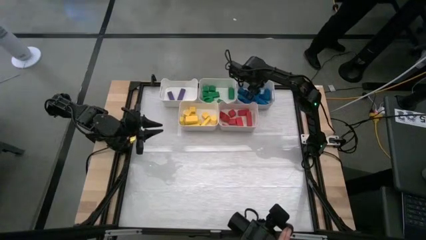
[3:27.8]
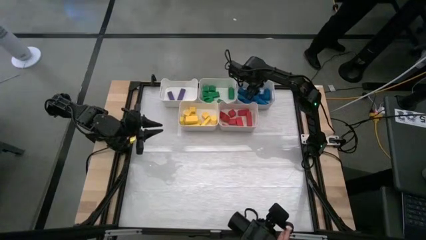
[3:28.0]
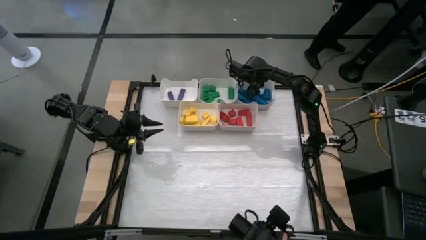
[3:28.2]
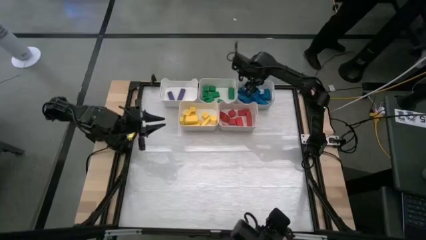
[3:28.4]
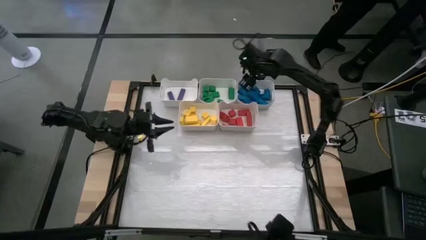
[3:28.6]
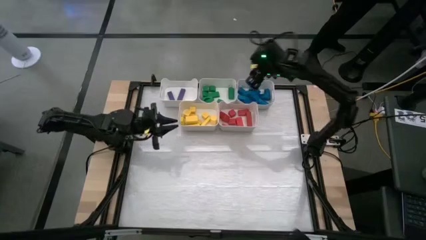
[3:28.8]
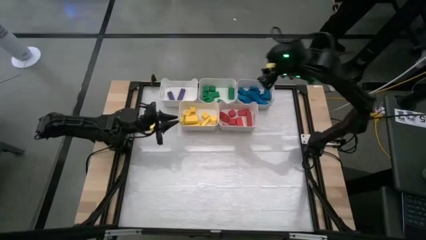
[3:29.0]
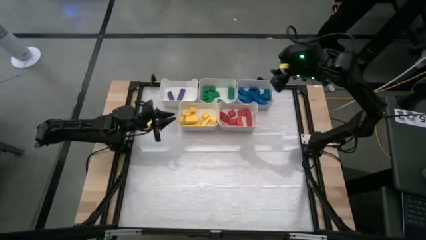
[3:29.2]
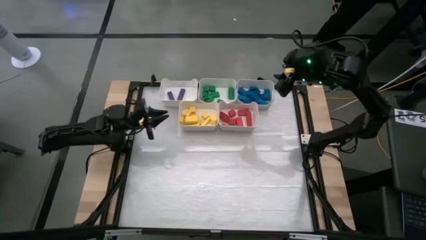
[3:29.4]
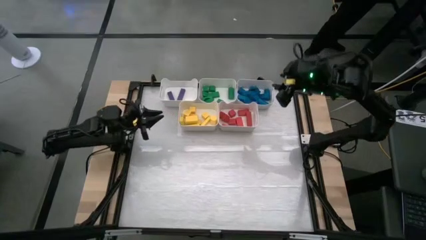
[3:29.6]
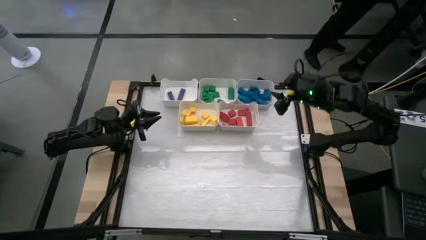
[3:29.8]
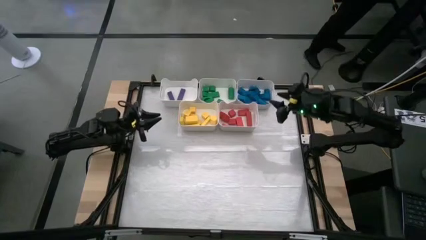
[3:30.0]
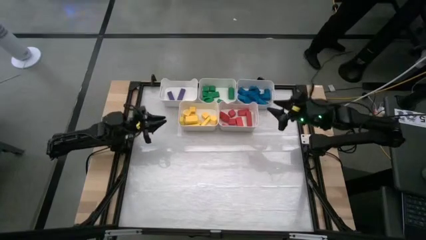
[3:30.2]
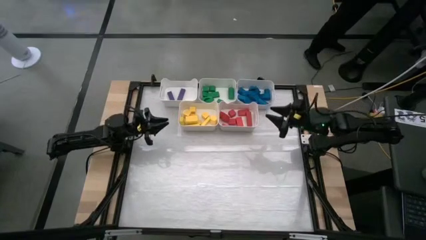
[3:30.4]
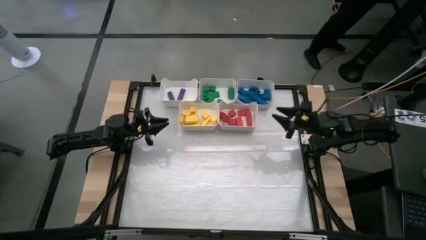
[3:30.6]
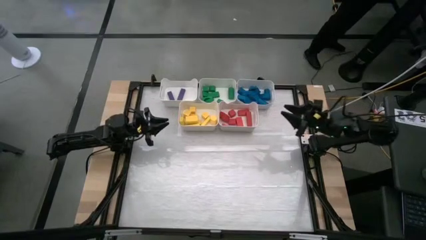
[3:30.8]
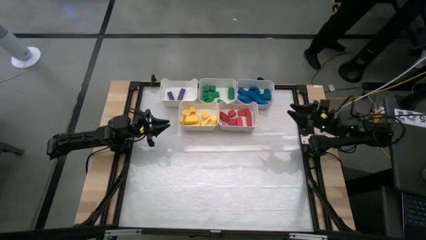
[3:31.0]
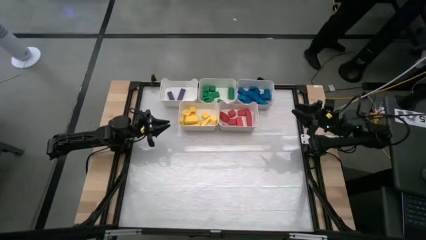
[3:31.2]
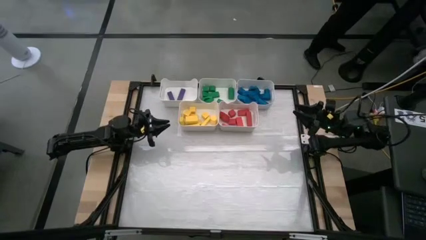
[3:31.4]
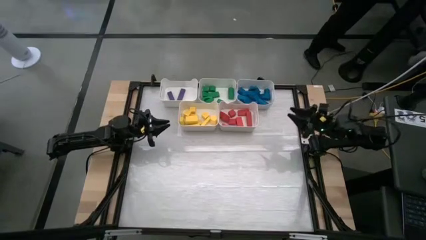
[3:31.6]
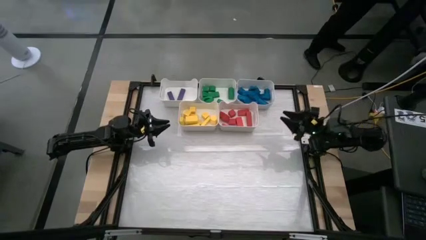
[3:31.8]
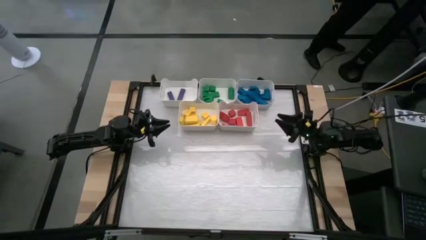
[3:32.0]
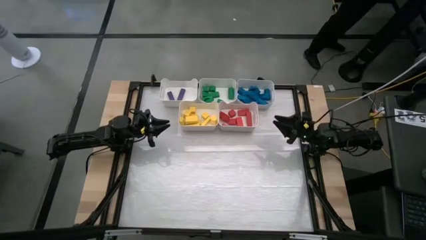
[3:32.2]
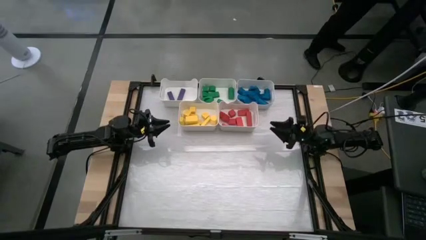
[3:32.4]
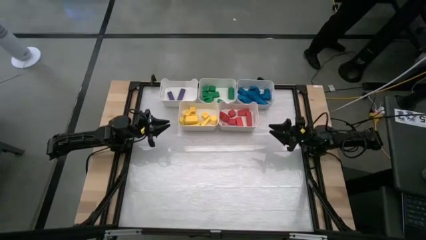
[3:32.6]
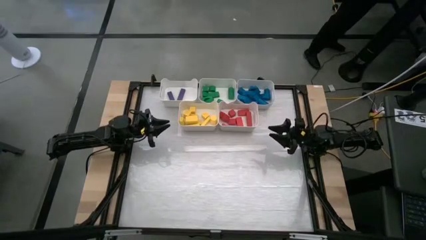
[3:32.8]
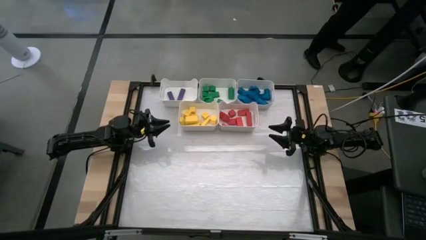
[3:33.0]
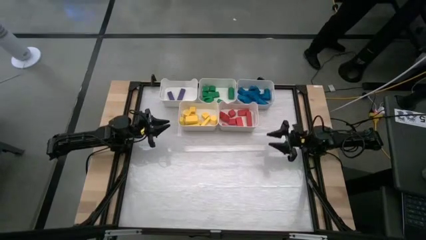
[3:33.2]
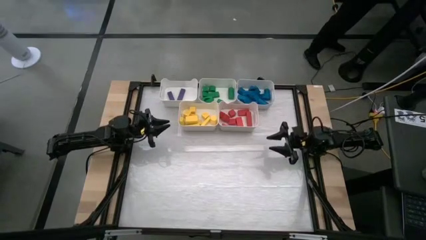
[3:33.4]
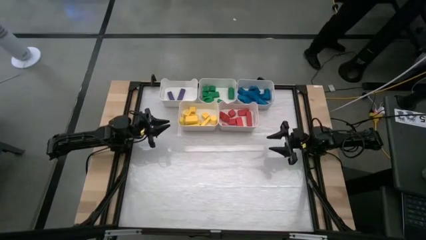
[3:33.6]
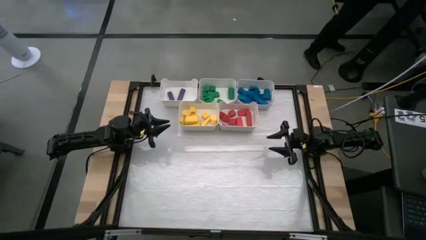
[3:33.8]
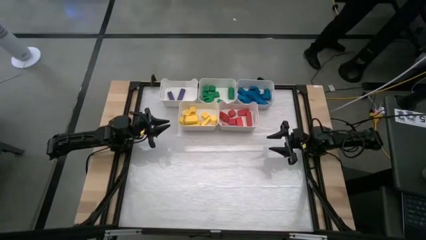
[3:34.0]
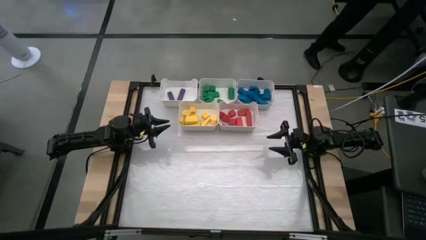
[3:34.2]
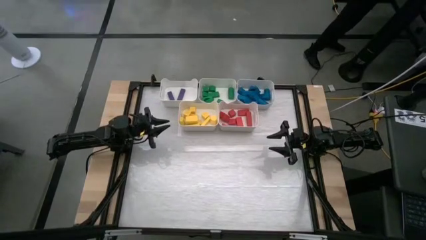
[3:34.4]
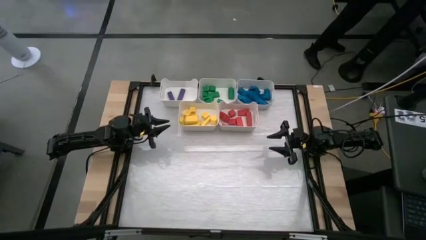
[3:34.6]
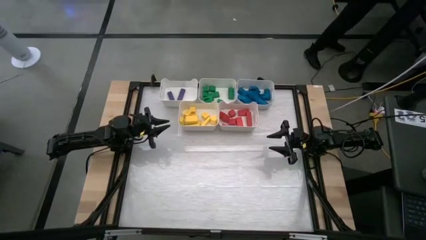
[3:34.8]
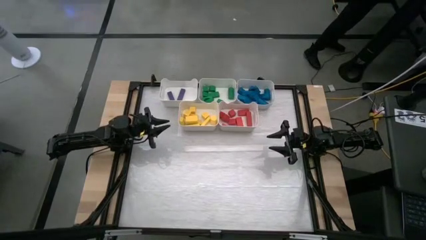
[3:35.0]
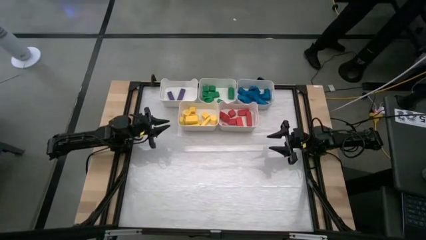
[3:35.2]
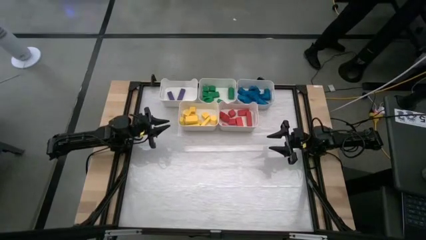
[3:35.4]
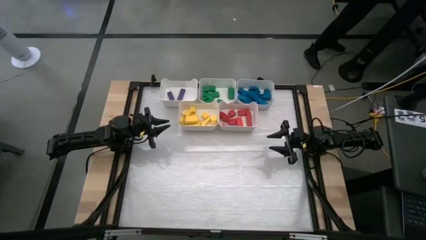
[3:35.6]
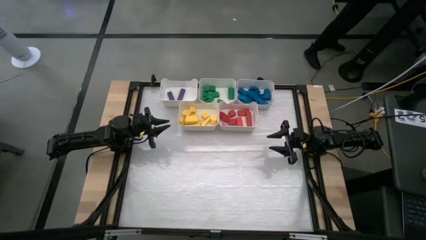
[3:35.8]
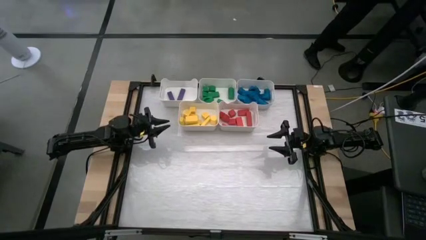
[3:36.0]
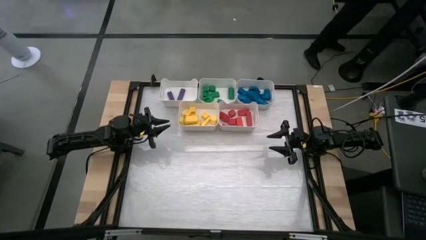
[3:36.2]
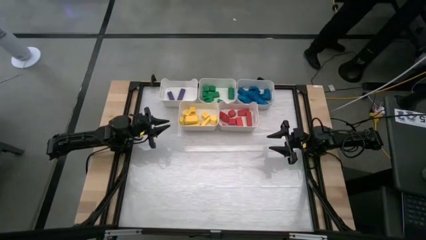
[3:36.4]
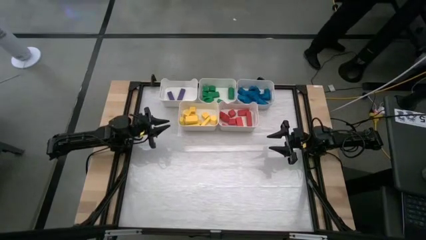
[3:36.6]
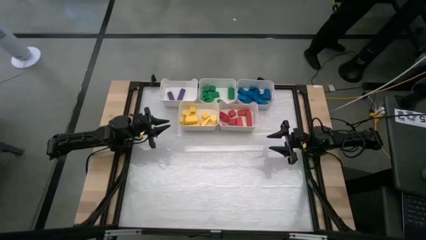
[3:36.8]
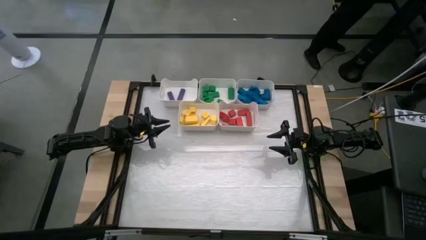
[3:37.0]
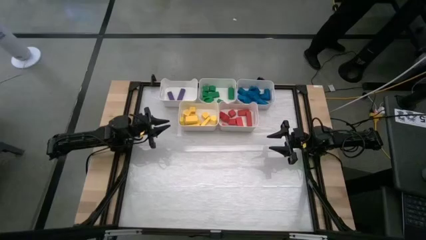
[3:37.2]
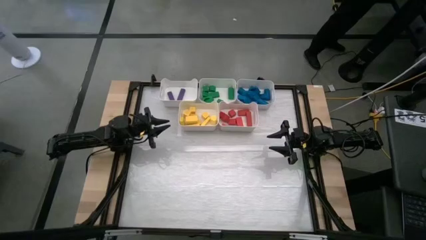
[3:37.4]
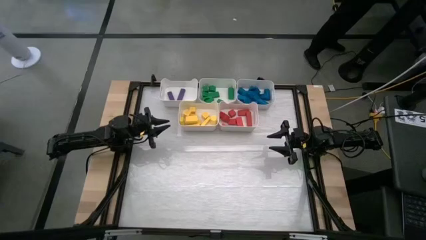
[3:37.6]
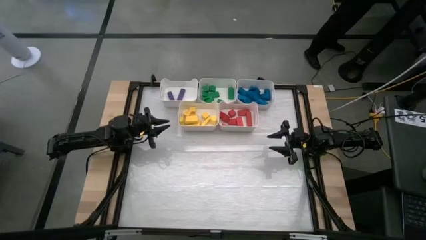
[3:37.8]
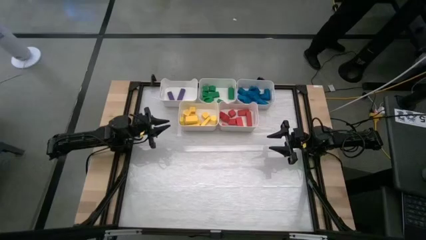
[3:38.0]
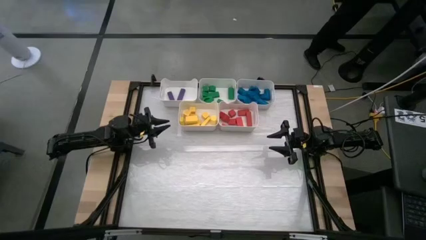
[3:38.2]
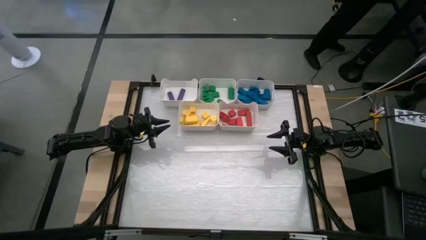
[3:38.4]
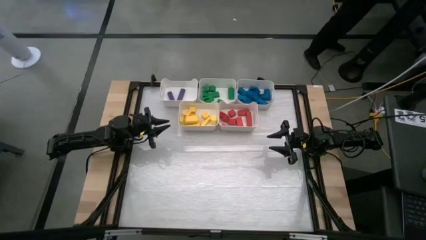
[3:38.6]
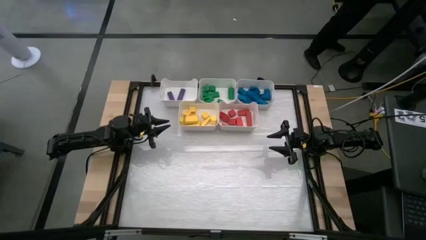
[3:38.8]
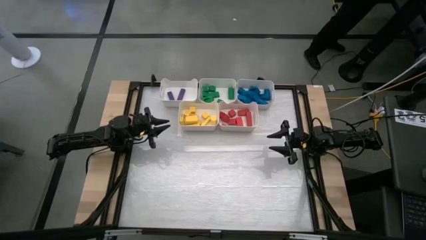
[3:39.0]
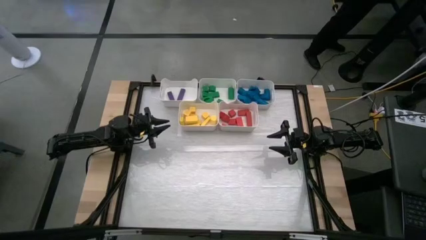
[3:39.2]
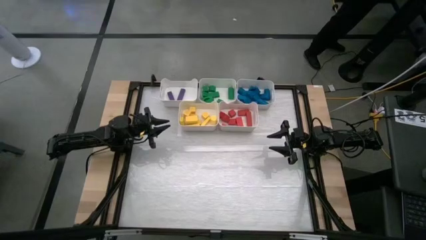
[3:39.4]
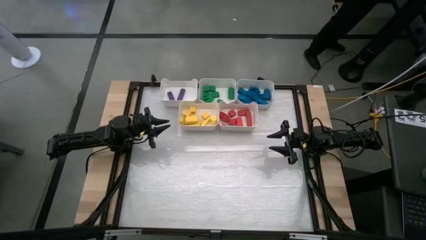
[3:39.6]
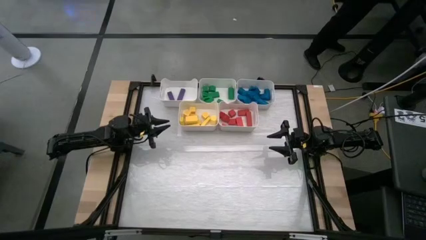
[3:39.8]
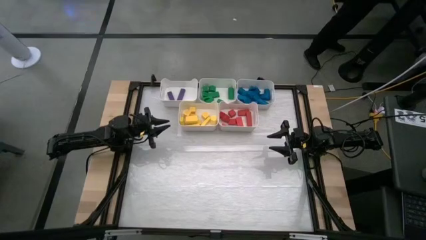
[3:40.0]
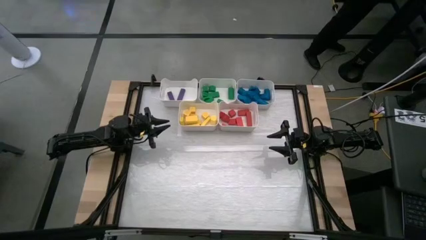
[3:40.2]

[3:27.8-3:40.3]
Task: Sort blocks
Return to Home Position

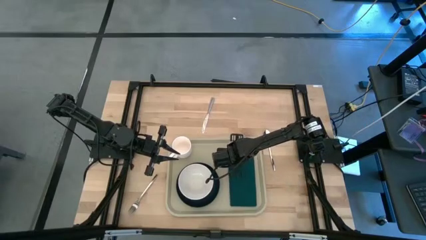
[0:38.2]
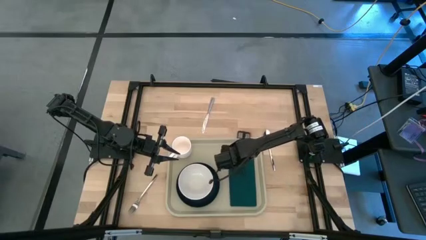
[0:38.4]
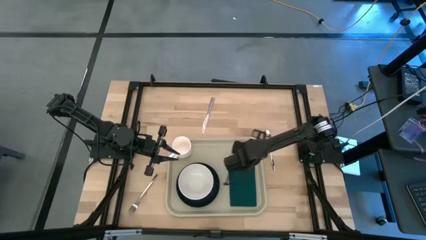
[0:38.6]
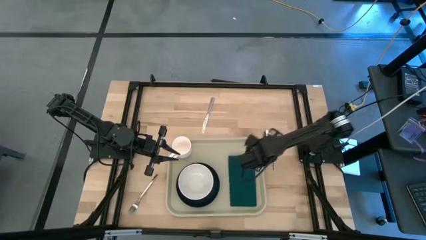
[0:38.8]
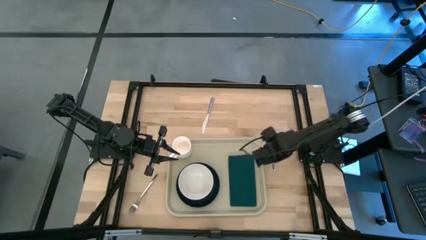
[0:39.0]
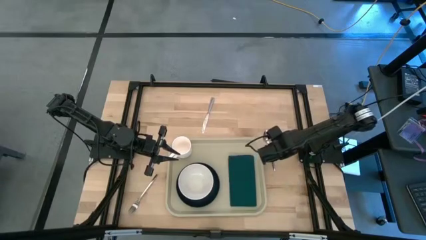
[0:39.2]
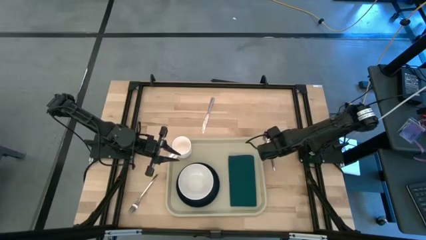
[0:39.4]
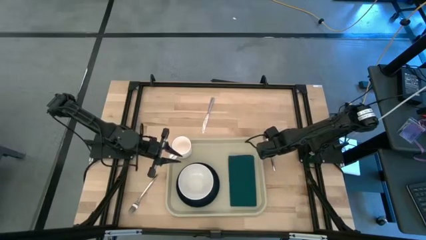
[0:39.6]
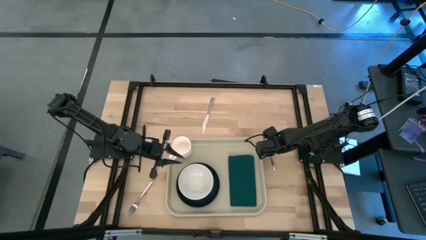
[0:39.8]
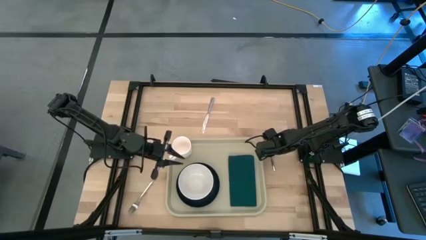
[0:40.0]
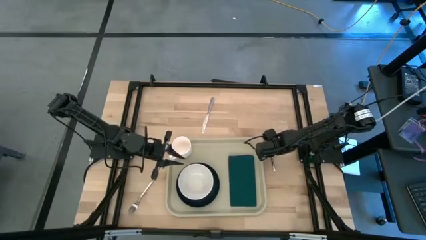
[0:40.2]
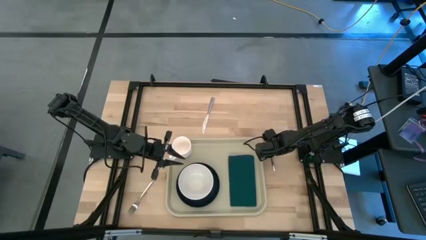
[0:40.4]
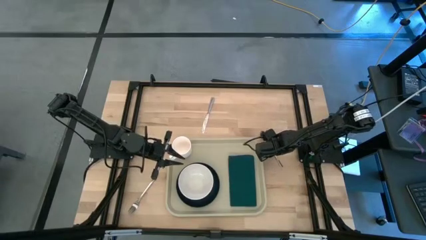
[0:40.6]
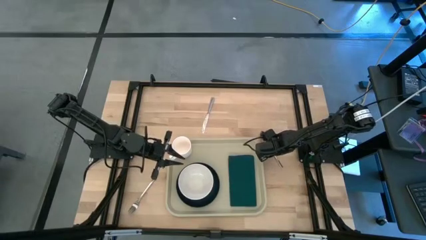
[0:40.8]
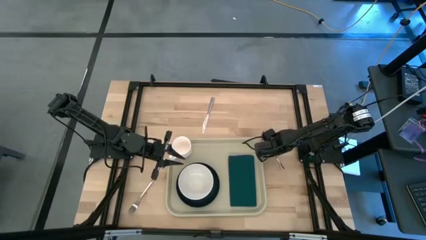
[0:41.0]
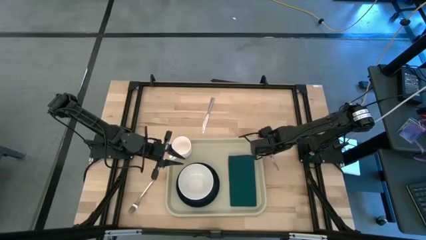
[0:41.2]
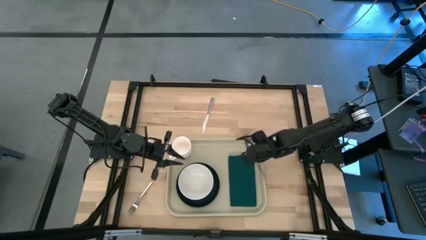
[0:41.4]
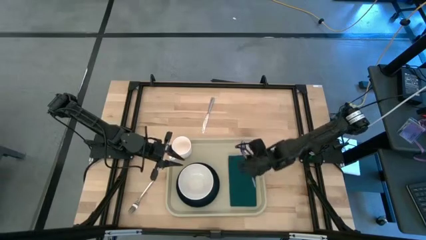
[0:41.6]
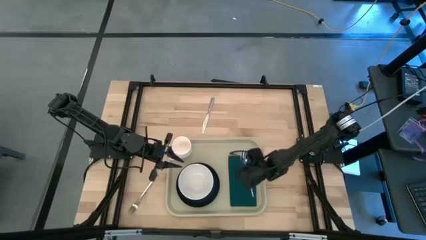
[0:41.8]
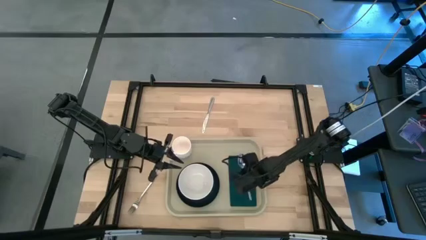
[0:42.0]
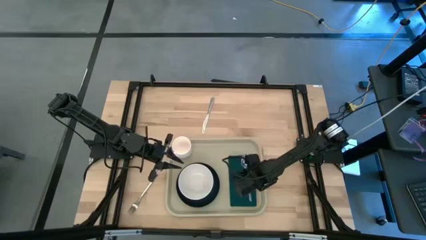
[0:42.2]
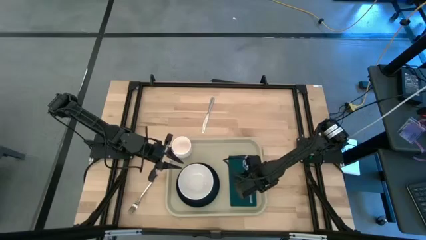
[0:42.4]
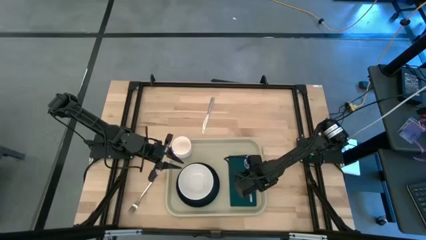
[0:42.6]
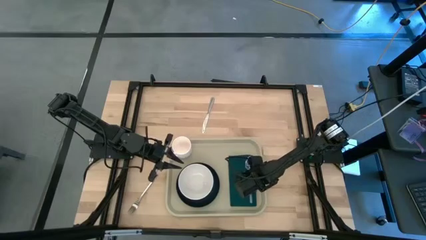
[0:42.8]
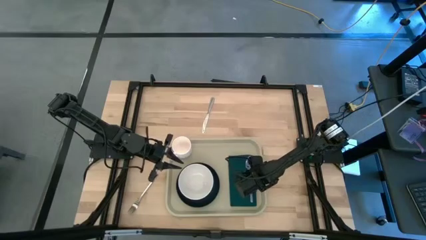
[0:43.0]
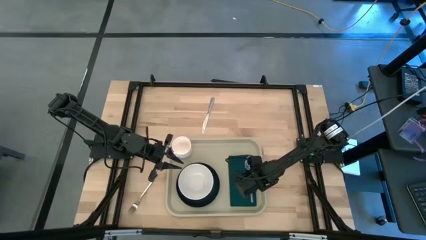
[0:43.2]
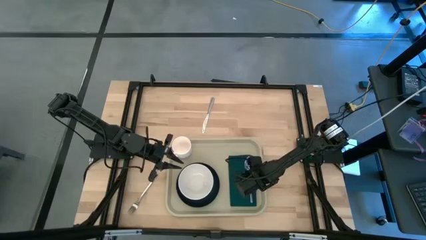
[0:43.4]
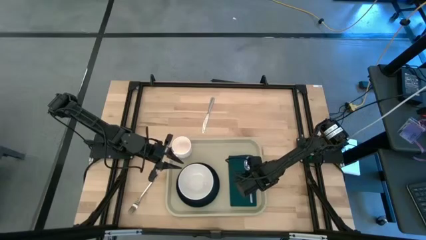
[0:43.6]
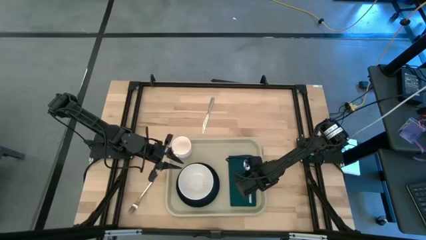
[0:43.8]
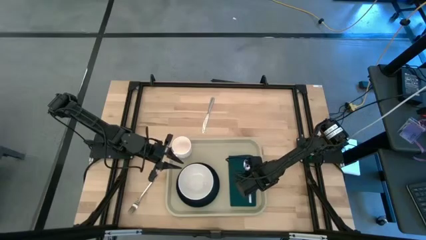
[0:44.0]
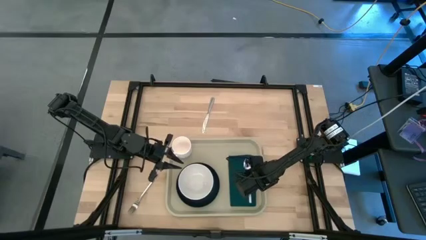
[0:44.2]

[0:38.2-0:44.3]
Task: Set up tray
Put the silver spoon on the green napkin
